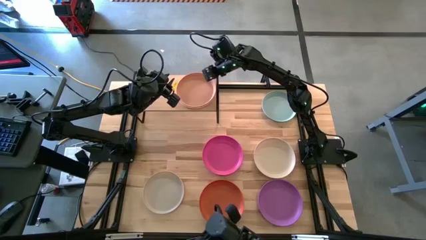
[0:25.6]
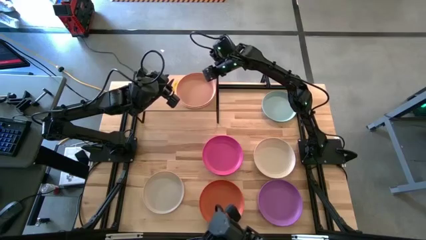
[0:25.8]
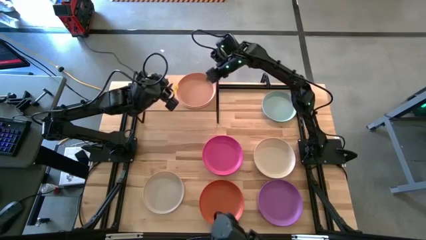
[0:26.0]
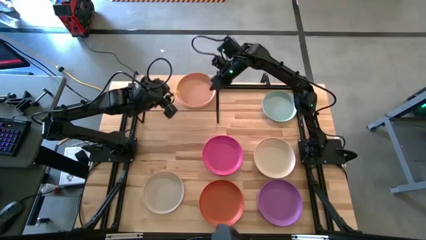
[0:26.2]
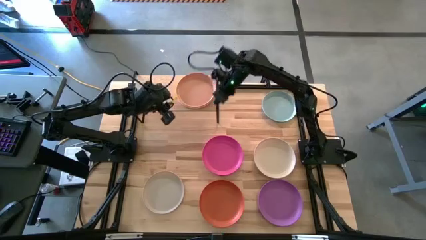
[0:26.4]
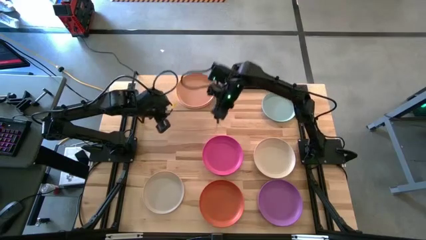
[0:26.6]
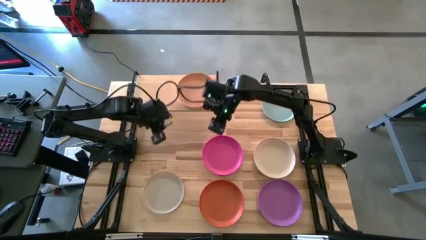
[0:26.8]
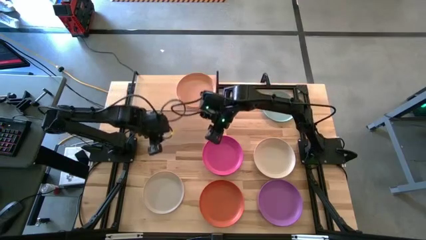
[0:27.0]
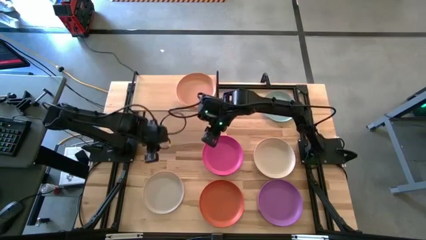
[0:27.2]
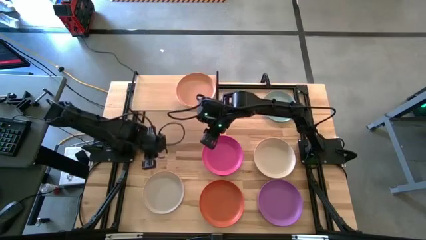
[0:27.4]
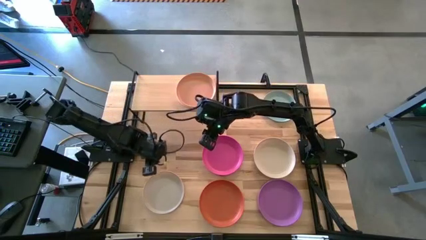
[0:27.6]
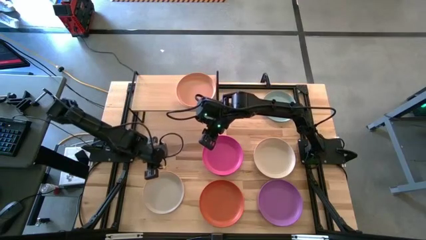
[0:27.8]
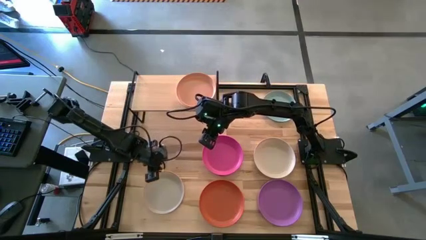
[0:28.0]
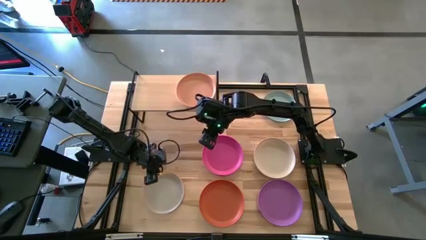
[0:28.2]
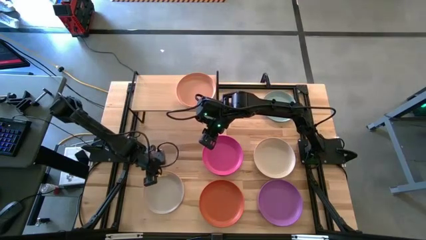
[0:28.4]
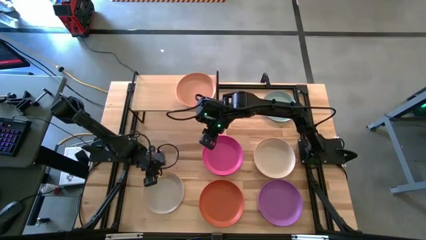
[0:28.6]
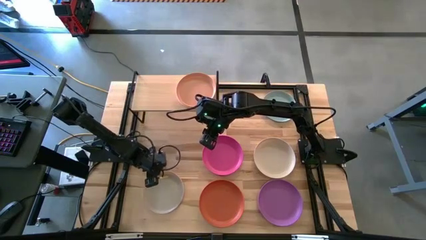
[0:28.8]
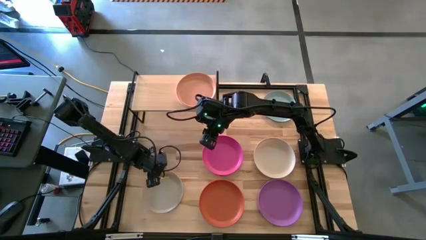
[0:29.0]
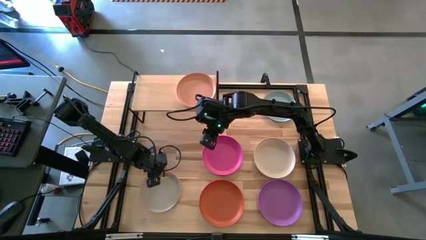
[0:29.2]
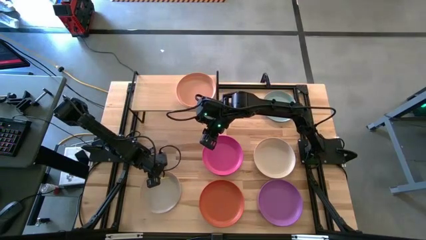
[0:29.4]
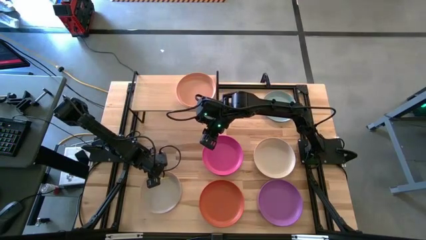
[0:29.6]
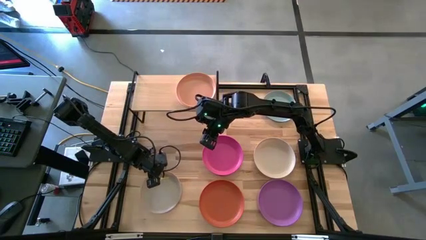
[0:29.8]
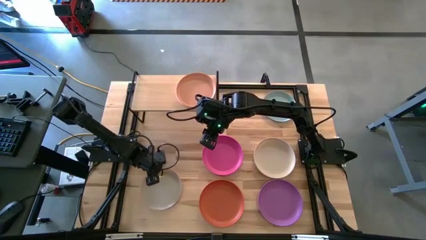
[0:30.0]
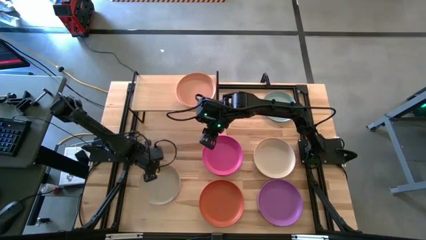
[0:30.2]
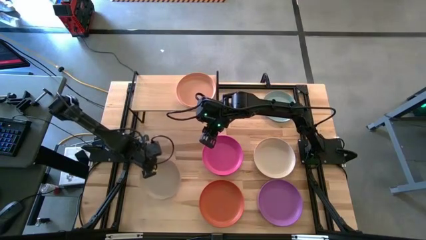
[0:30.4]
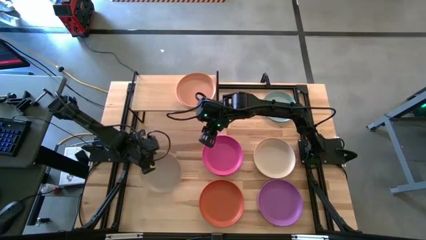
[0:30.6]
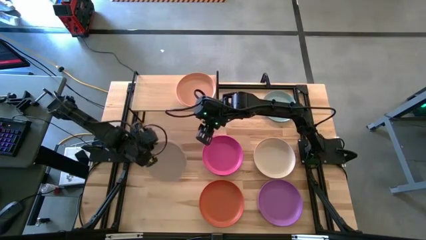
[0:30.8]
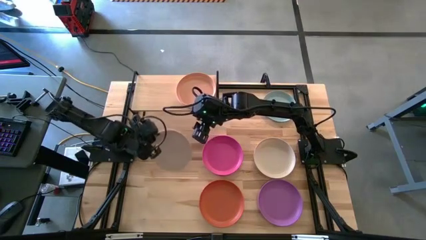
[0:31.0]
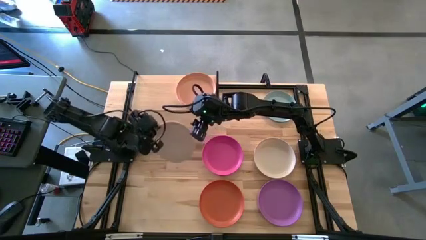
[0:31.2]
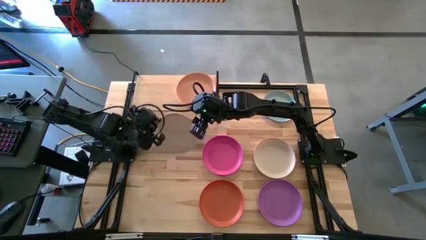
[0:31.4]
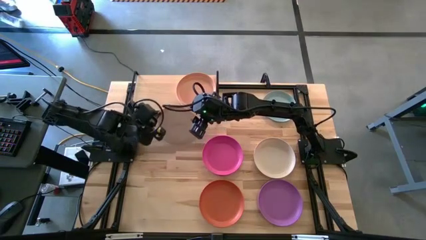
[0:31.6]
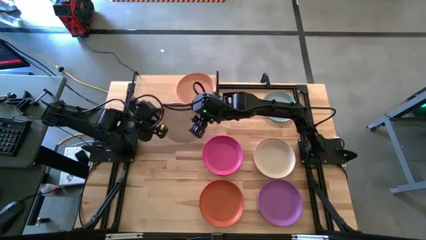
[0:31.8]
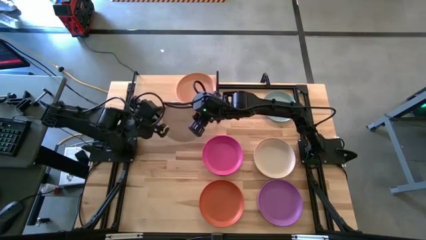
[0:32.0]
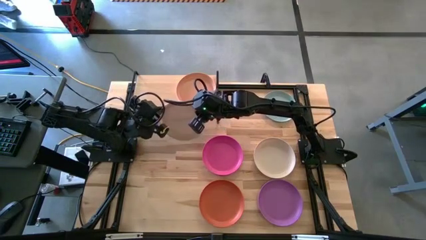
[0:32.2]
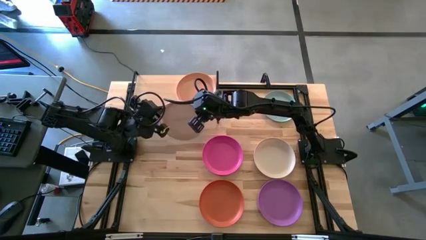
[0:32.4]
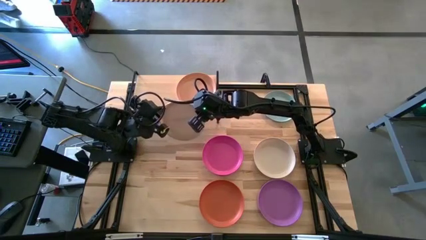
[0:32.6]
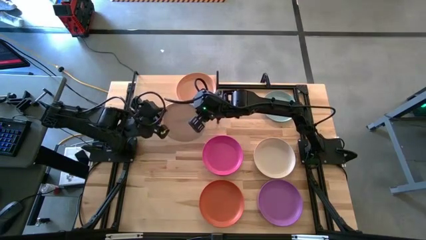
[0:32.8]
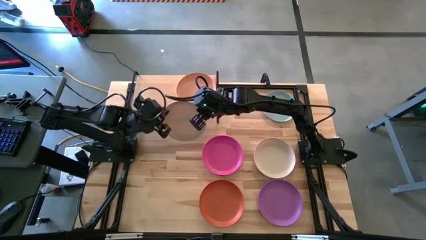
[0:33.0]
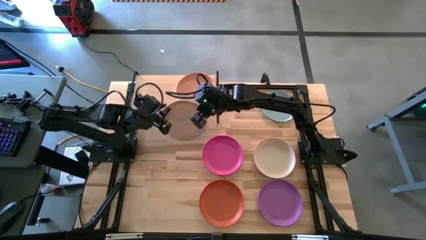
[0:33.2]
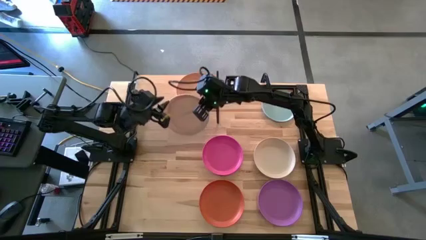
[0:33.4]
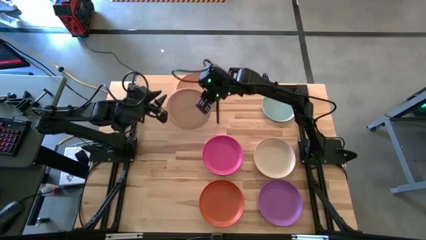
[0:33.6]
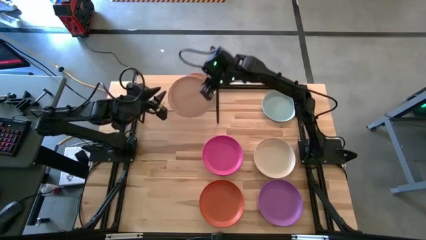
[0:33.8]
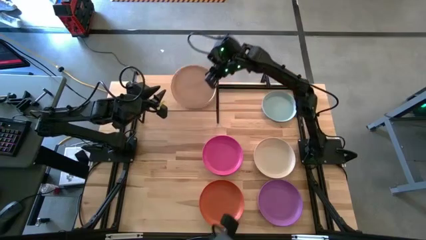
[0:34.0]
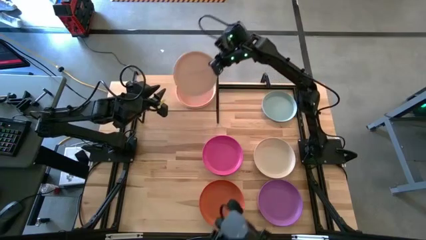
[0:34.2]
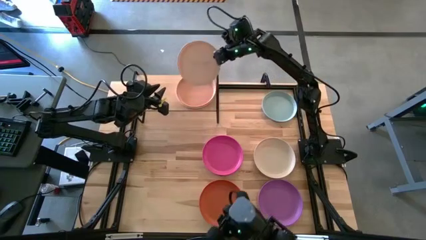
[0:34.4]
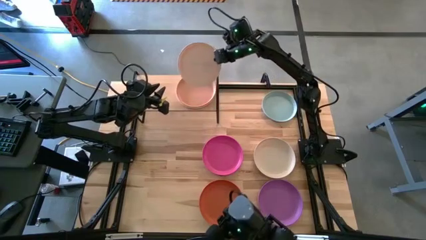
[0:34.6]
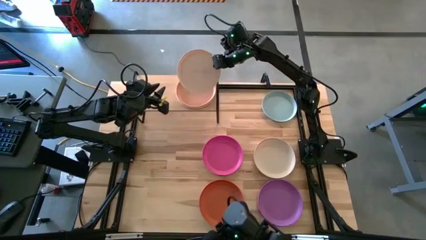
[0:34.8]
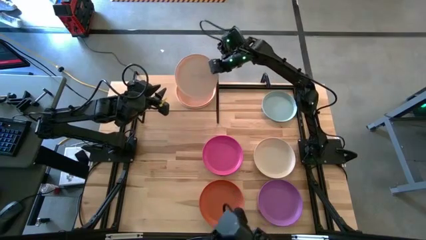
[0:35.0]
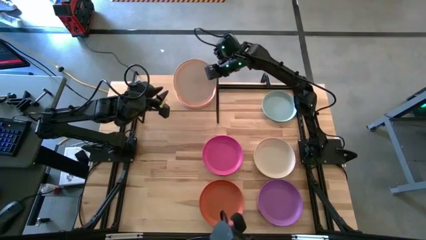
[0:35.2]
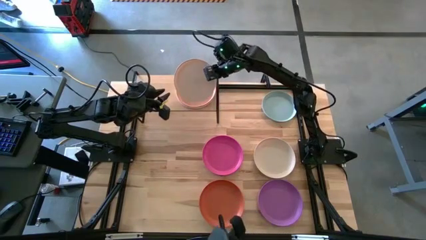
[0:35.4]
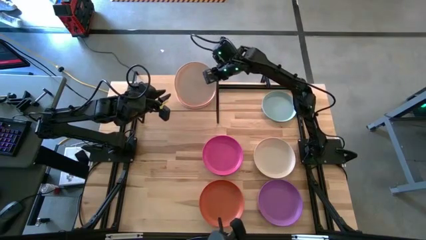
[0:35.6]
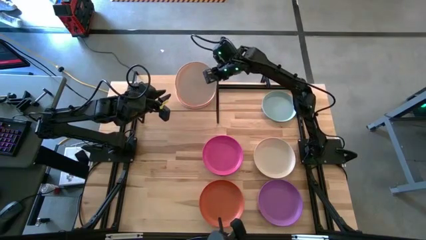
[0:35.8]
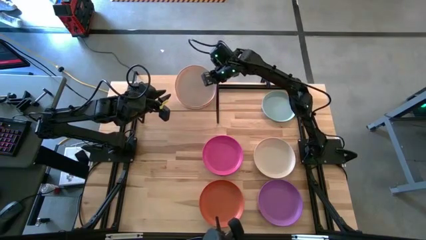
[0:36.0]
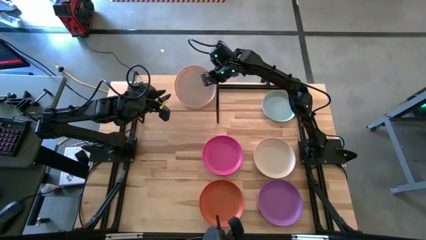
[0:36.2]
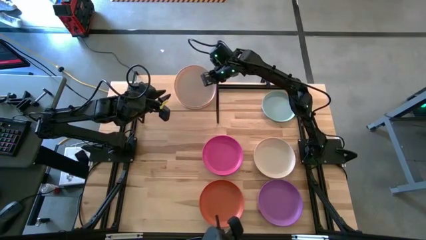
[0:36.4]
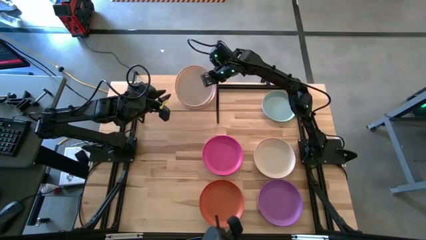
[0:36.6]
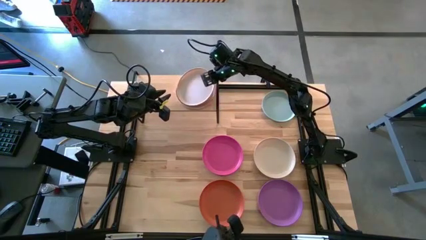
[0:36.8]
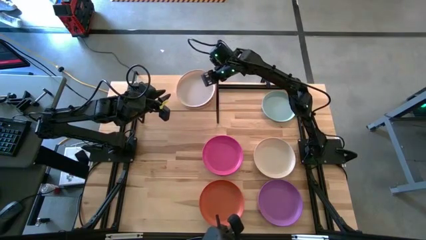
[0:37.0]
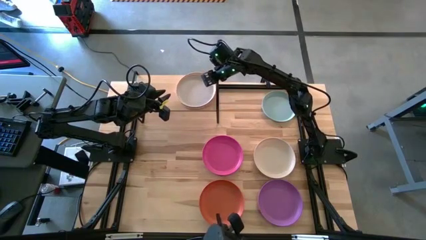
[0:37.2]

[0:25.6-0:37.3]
Task: Place and stack plates onto a shelf
Stack the gray plate on top of the brown plate on the shelf

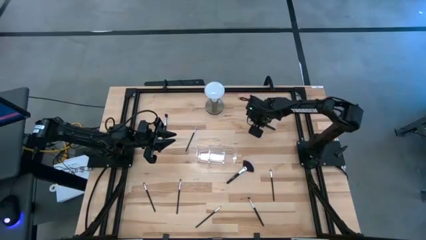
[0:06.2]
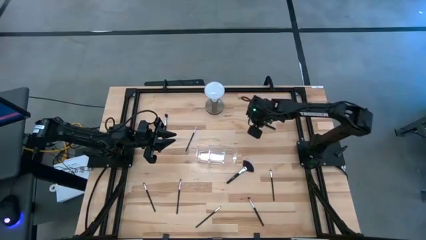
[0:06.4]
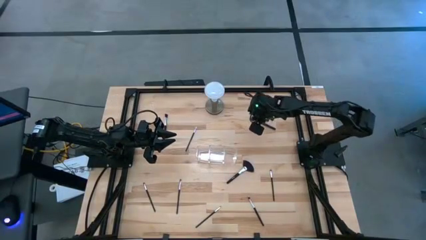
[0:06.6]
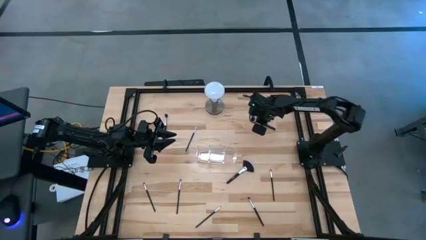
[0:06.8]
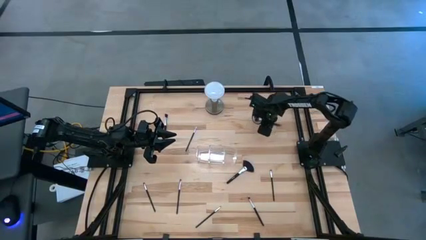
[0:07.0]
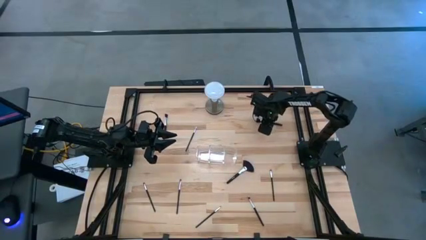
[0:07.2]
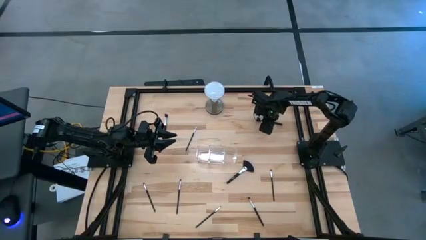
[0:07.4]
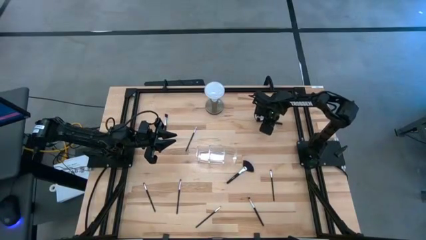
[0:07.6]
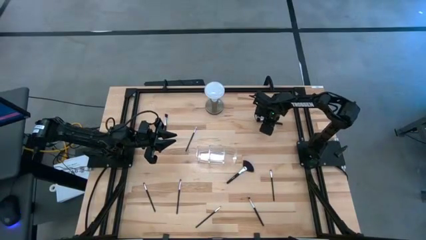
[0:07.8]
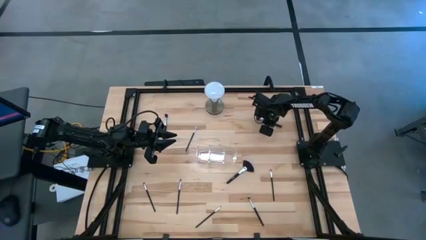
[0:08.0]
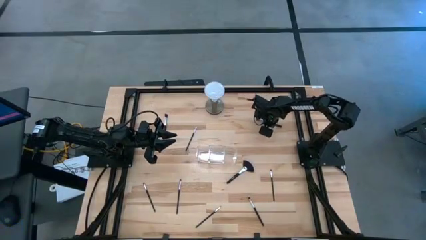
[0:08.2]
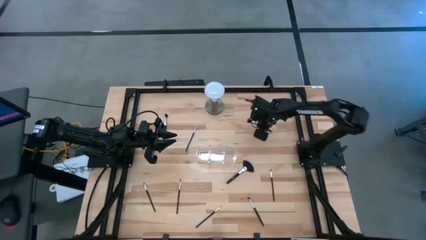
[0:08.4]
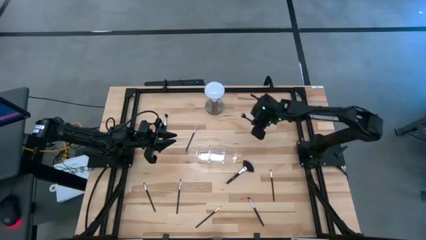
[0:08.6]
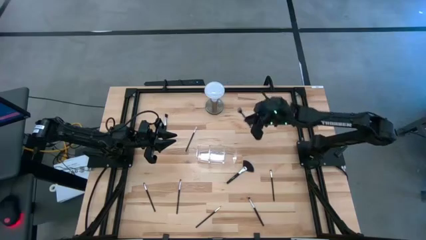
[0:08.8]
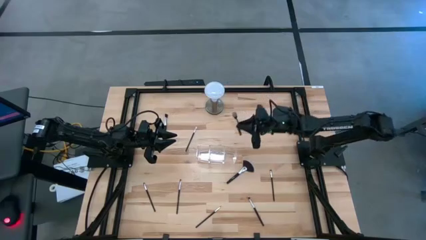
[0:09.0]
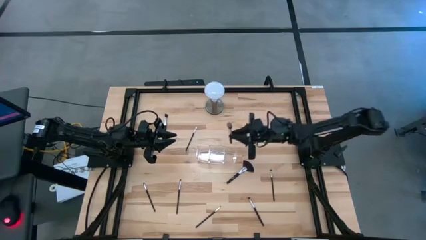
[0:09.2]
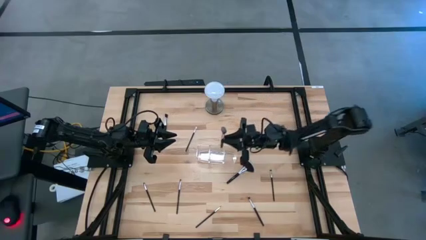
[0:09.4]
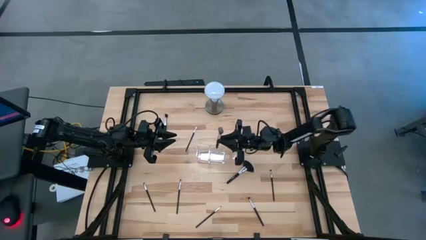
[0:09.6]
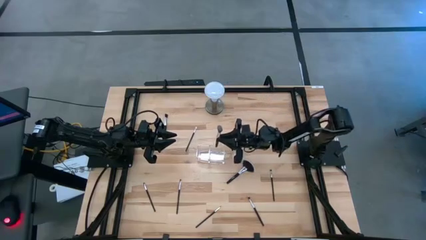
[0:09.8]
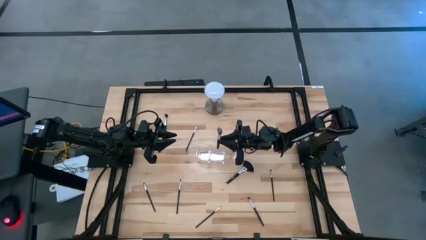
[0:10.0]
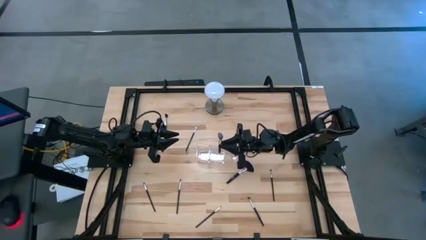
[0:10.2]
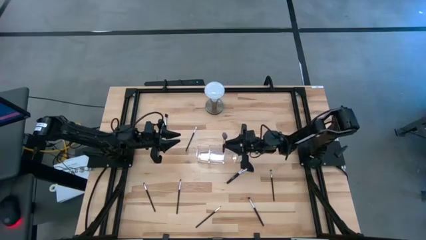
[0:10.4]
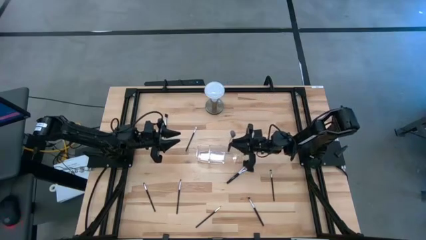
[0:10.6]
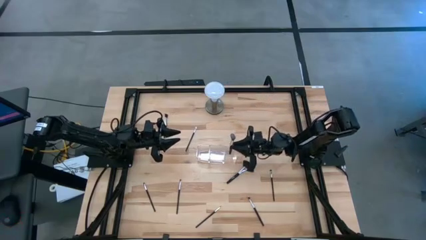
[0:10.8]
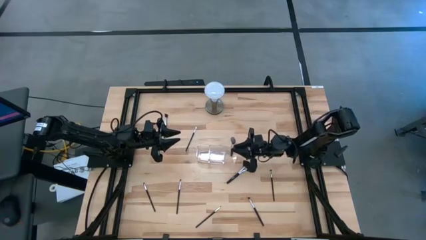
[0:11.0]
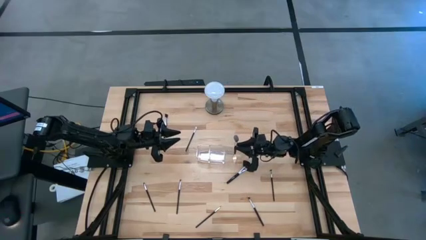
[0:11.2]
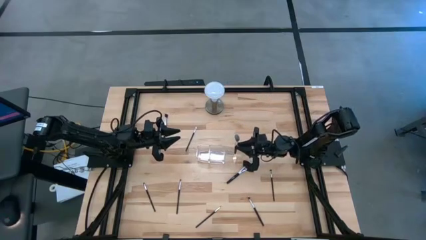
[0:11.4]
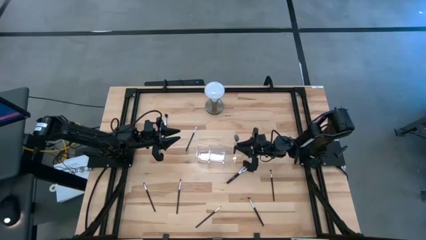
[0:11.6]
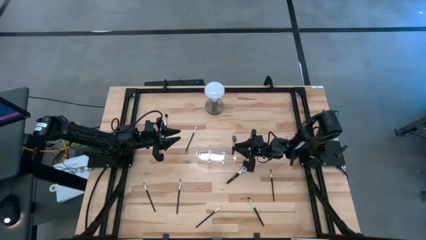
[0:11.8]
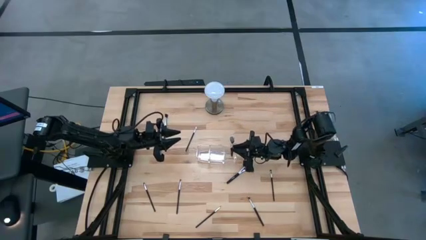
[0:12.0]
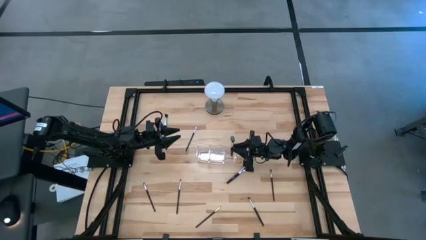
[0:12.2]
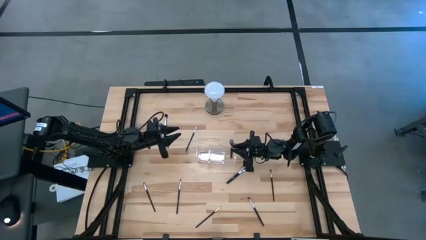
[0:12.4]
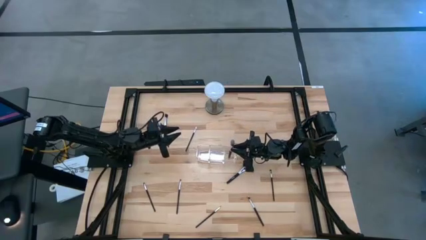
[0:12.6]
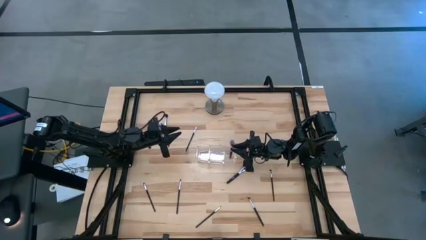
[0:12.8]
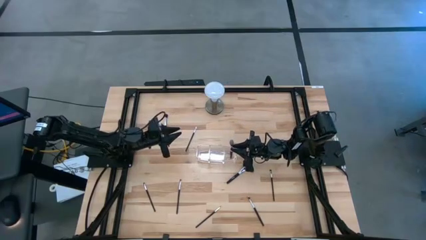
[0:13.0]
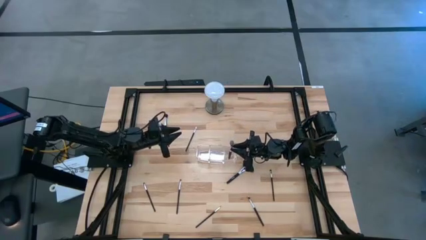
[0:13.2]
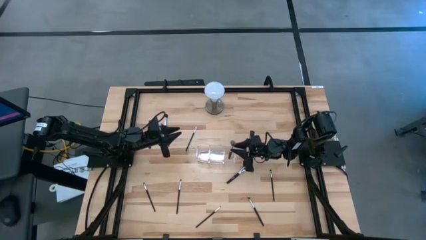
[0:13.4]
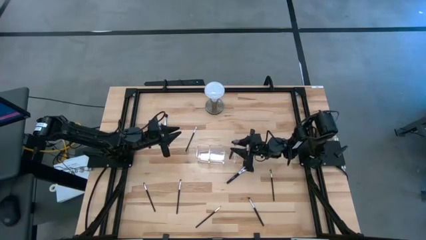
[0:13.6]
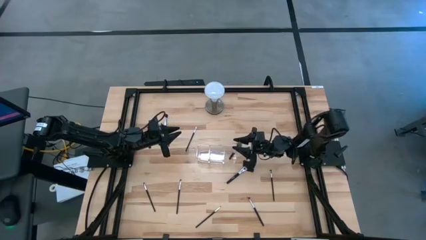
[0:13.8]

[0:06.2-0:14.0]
Task: Put items in baskets/containers
Put the black blush brush into the transparent organizer
